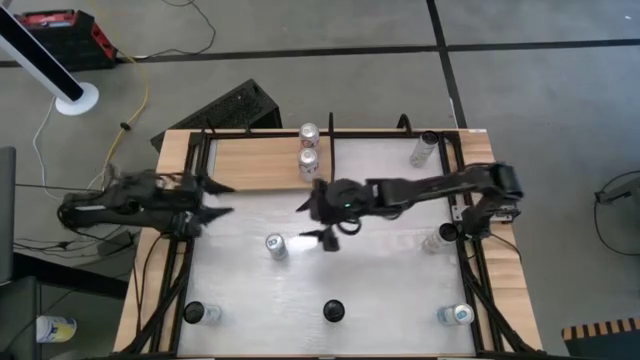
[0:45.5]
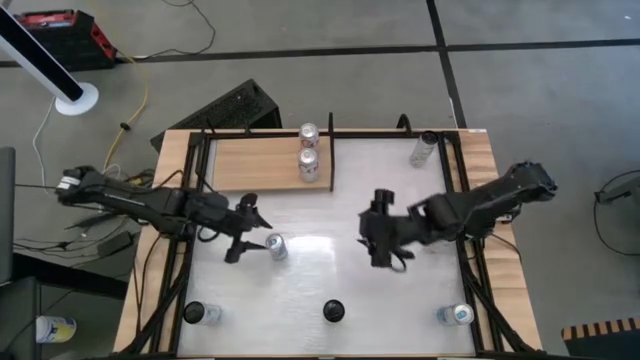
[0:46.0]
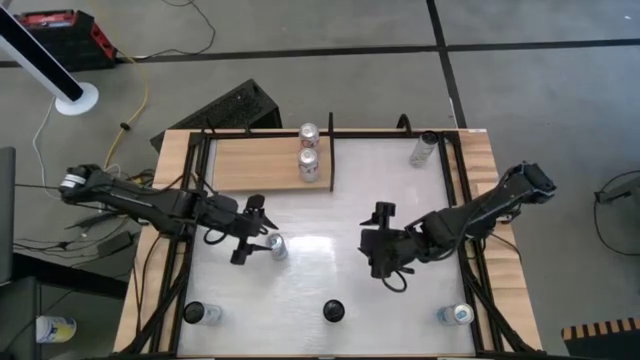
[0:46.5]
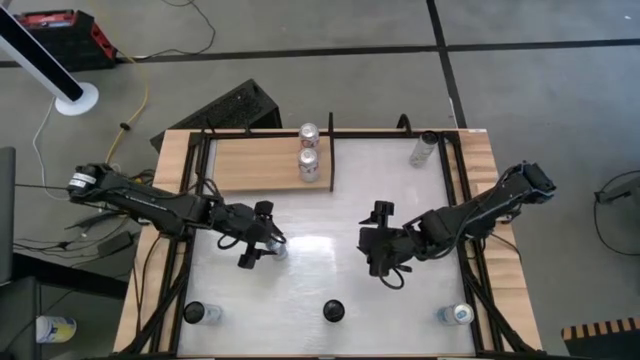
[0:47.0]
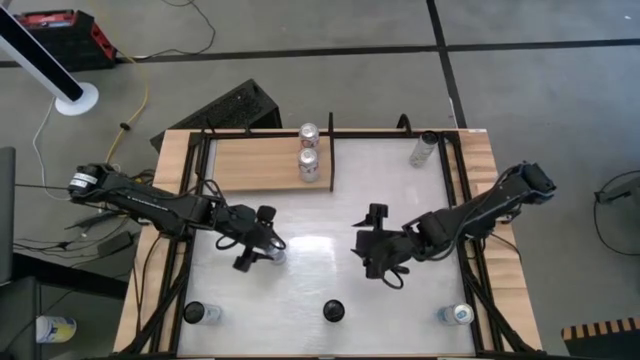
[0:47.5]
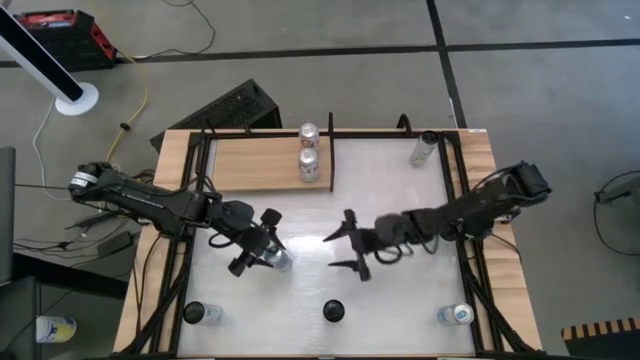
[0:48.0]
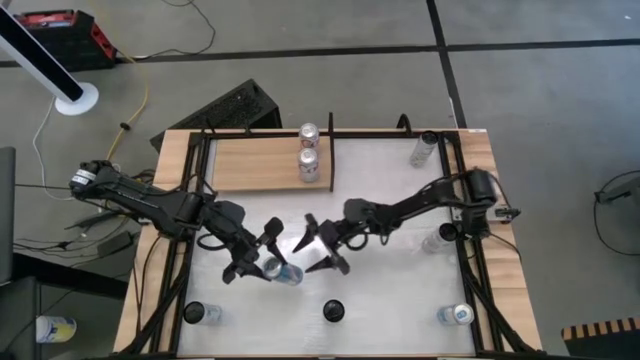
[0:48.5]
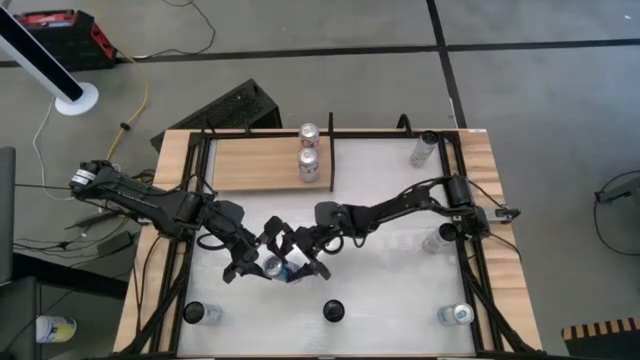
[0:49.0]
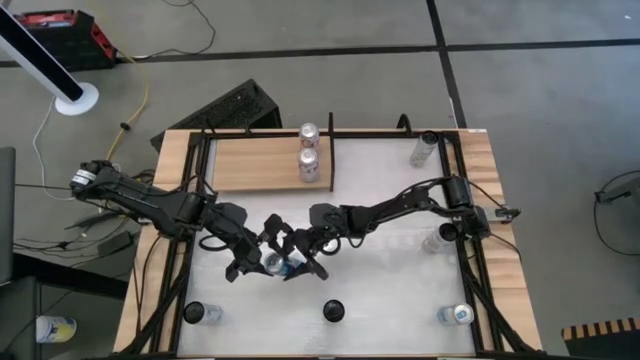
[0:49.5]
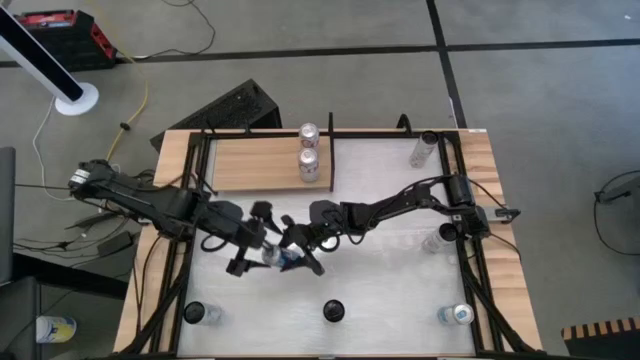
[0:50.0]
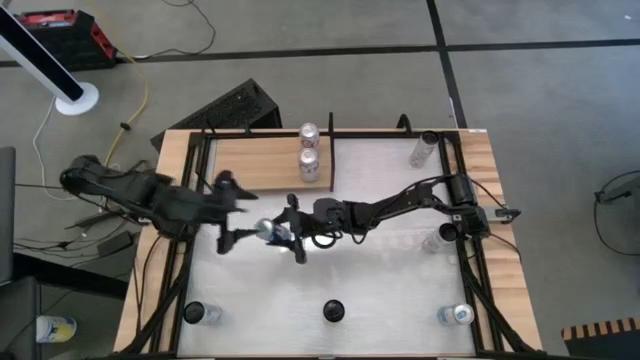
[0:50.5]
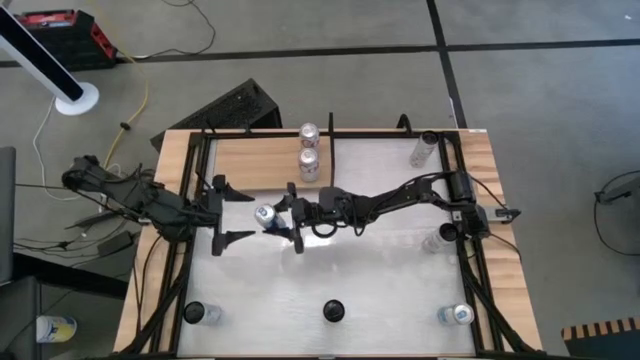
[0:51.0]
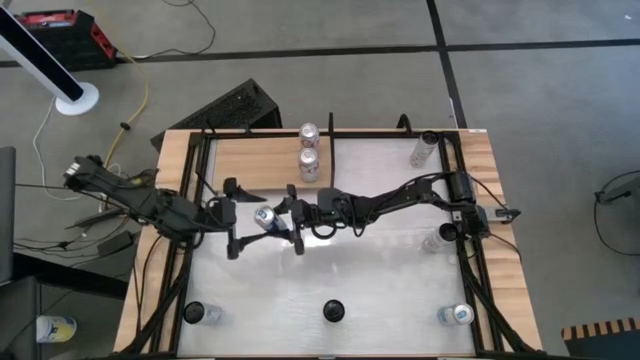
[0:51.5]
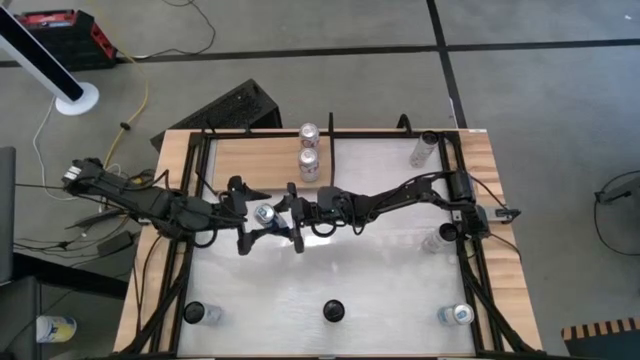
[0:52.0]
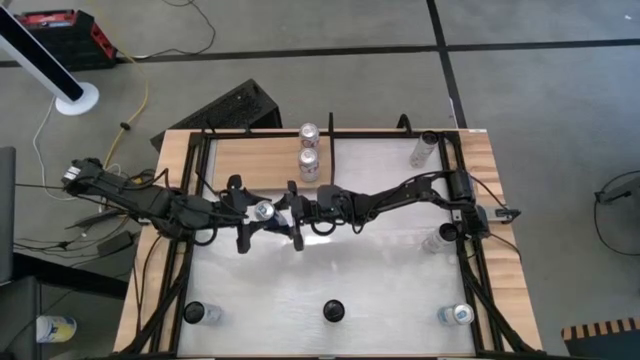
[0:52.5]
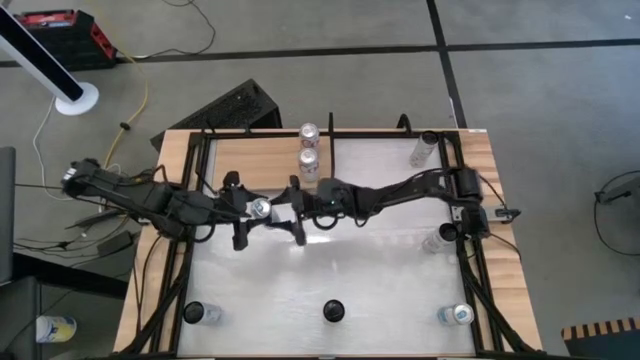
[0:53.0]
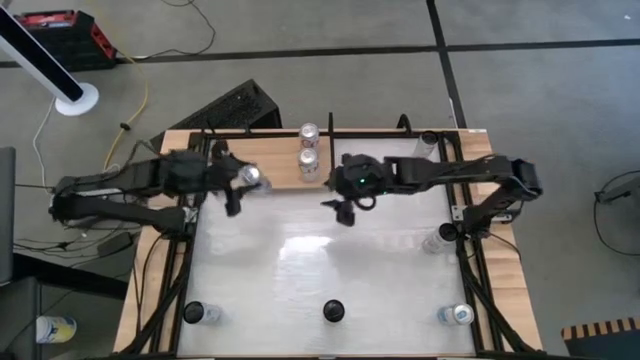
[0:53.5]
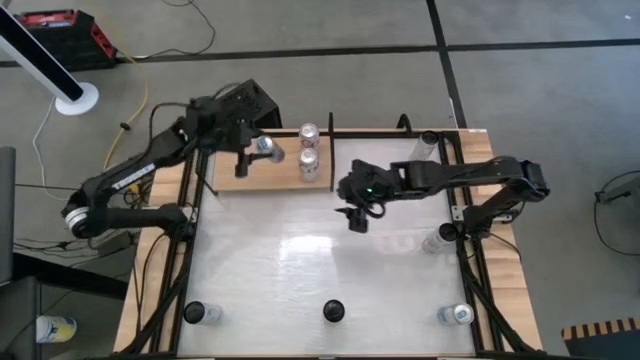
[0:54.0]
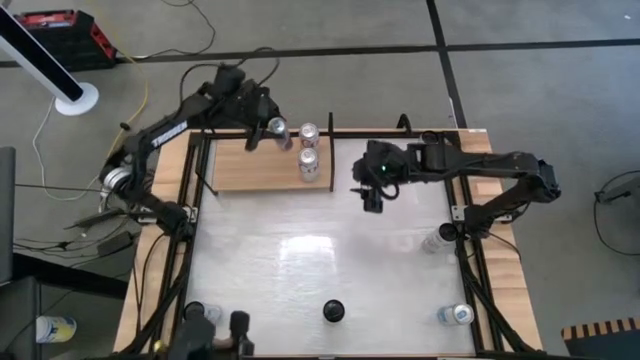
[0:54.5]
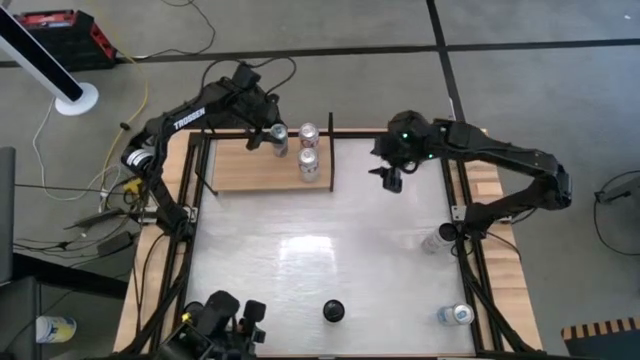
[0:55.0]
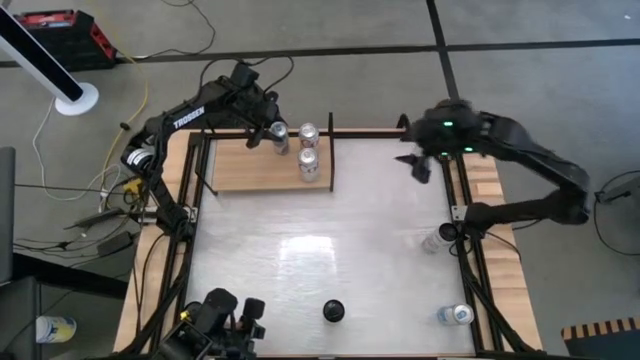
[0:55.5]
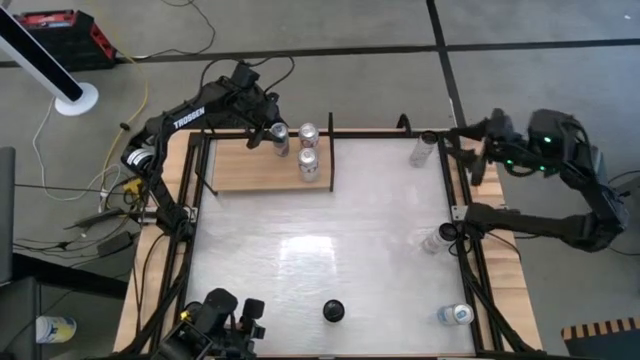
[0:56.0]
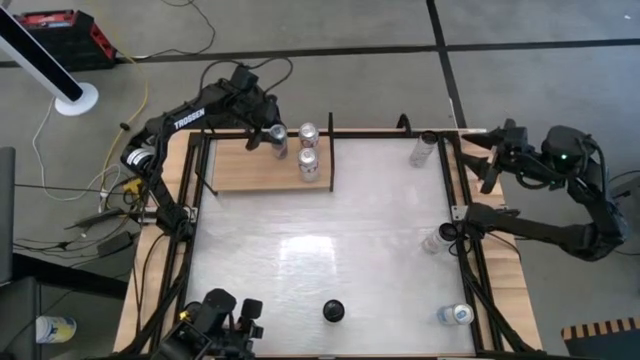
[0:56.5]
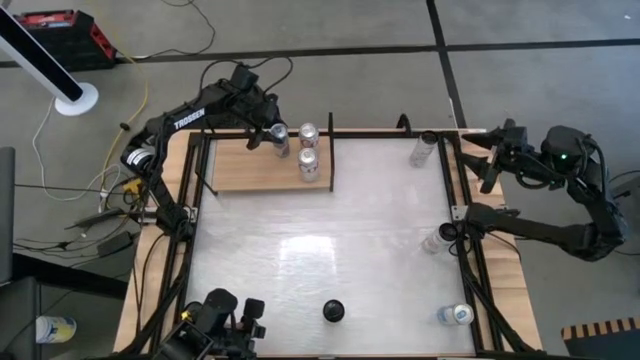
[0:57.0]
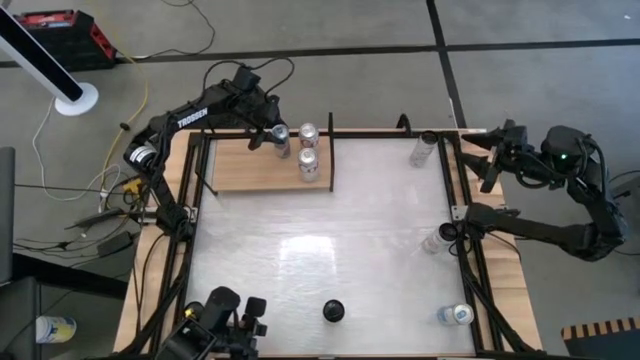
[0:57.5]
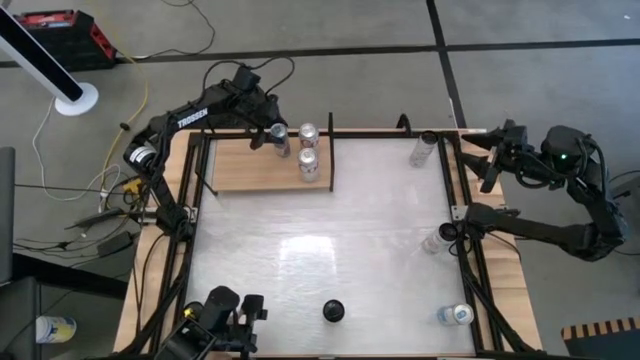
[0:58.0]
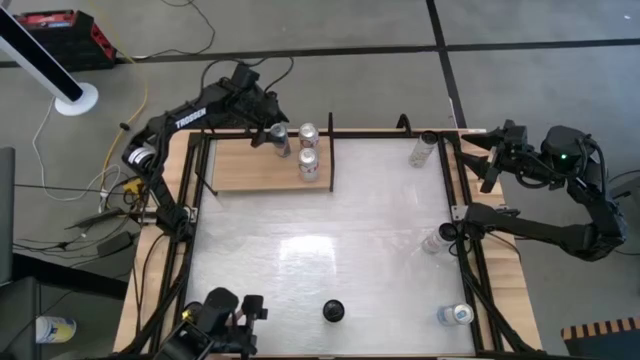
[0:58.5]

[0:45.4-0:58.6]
Task: Place canned beverage on shelf
Put the top blue soda can on the shelf
